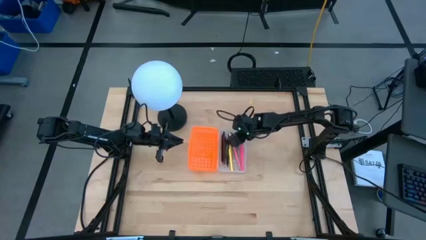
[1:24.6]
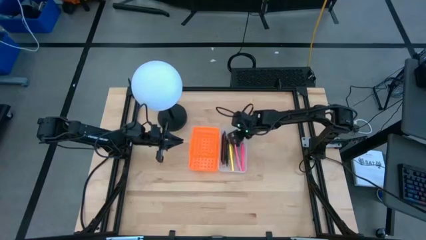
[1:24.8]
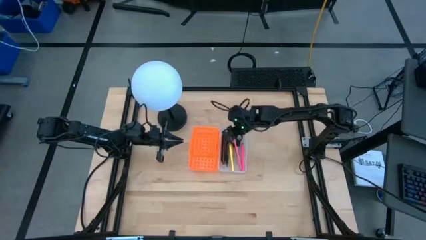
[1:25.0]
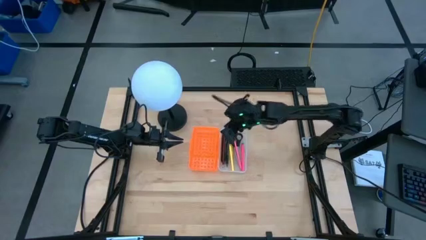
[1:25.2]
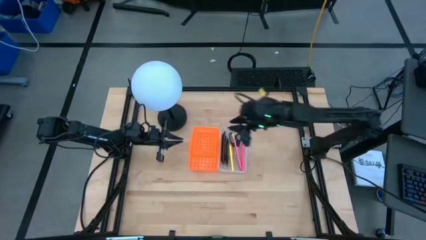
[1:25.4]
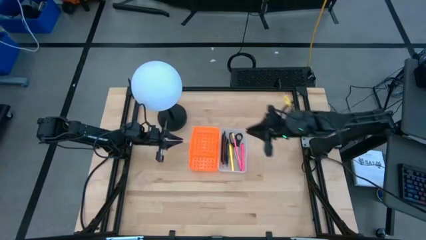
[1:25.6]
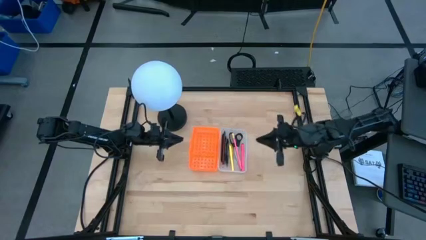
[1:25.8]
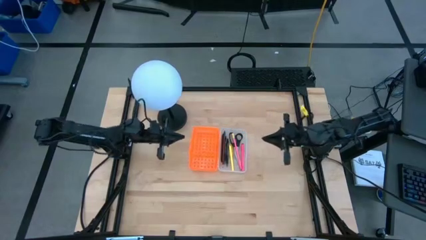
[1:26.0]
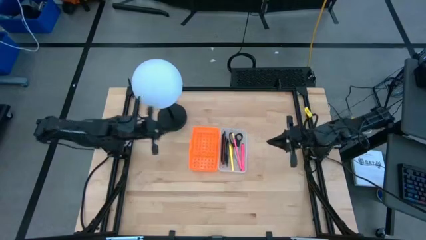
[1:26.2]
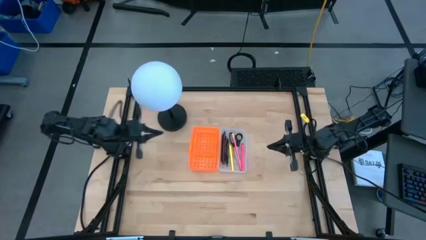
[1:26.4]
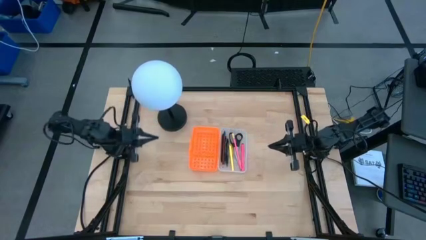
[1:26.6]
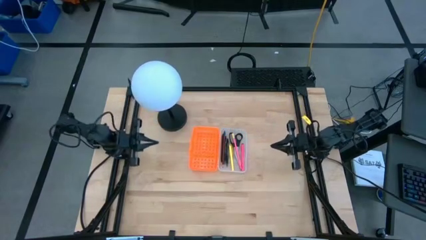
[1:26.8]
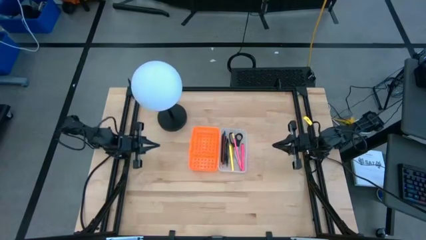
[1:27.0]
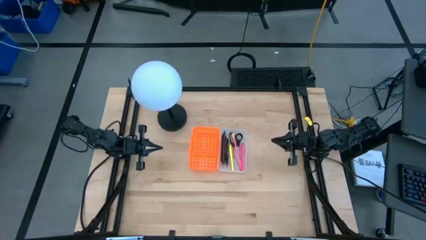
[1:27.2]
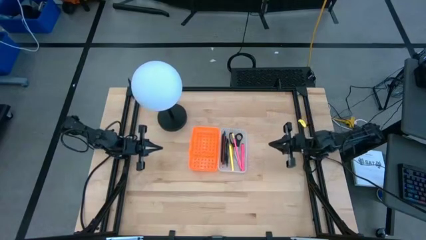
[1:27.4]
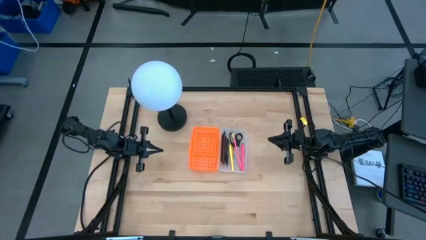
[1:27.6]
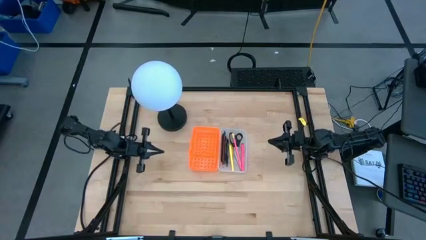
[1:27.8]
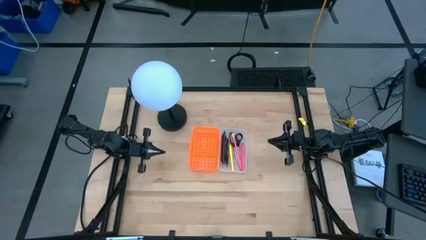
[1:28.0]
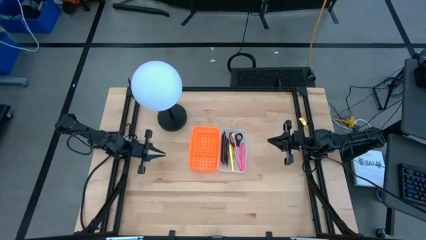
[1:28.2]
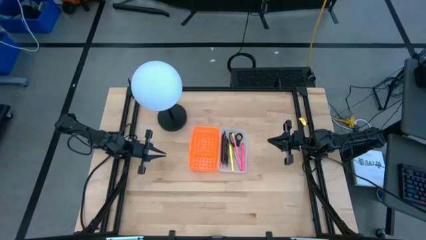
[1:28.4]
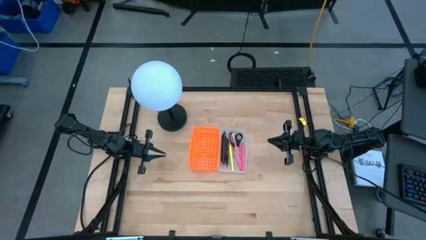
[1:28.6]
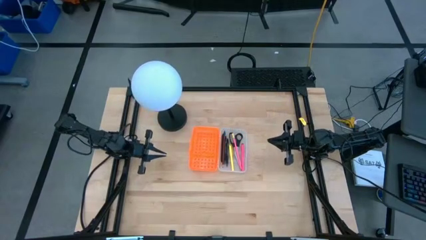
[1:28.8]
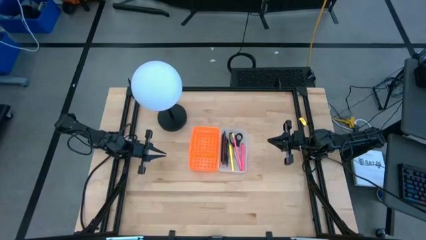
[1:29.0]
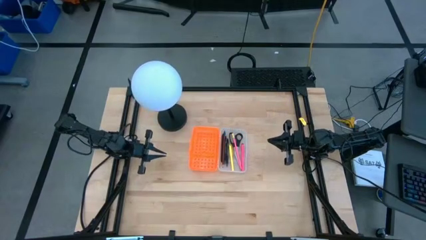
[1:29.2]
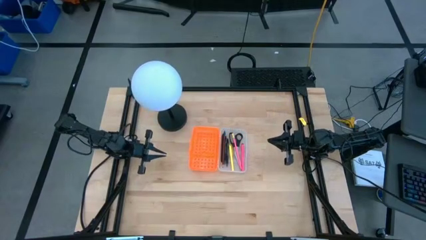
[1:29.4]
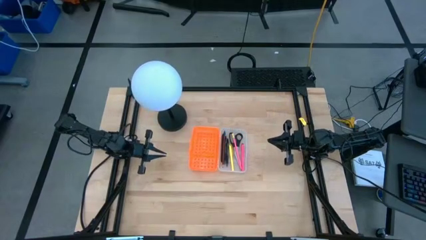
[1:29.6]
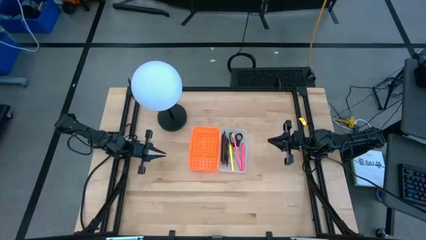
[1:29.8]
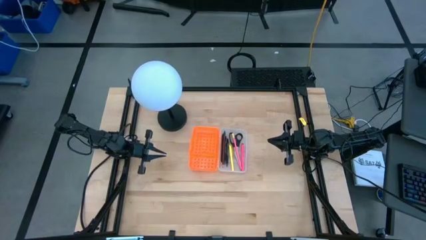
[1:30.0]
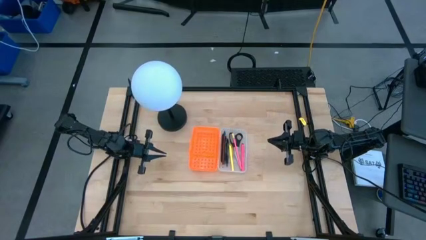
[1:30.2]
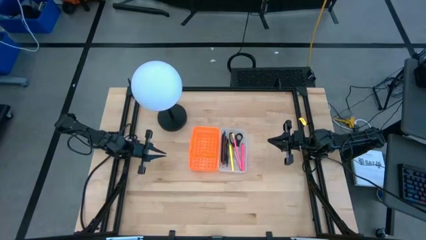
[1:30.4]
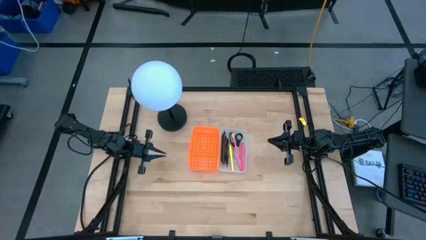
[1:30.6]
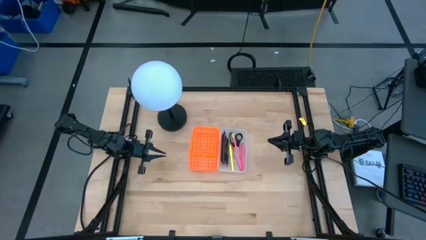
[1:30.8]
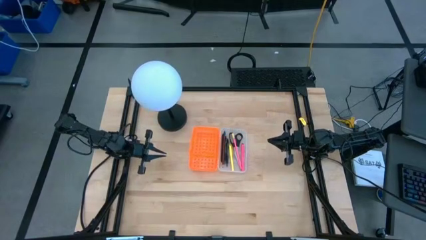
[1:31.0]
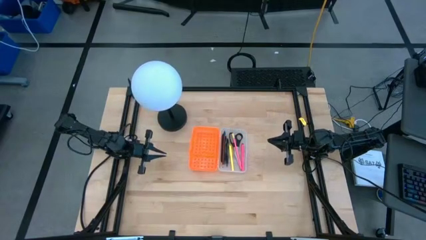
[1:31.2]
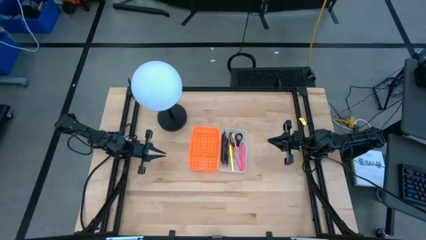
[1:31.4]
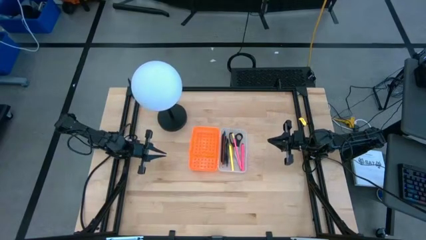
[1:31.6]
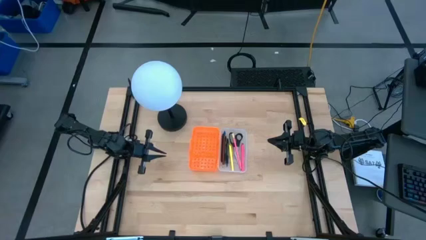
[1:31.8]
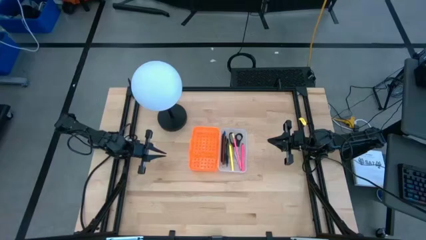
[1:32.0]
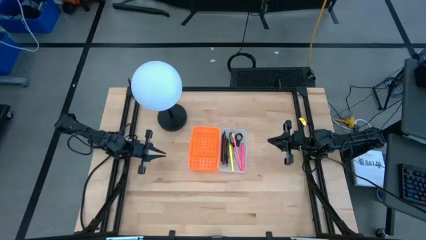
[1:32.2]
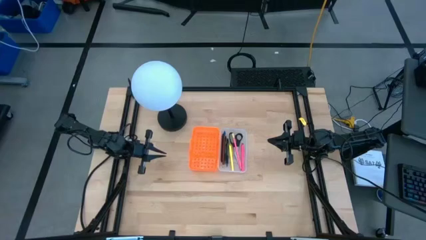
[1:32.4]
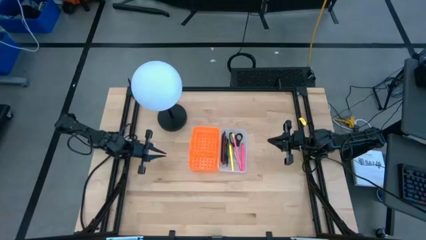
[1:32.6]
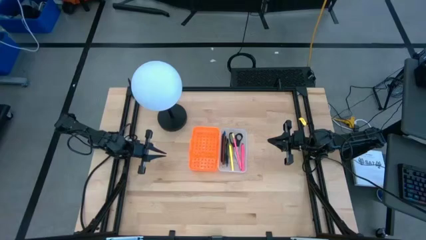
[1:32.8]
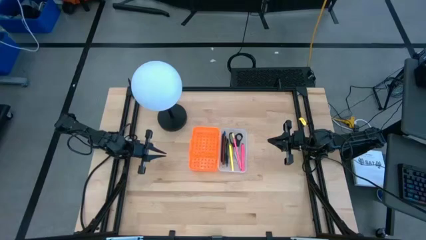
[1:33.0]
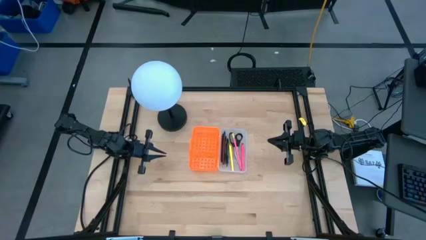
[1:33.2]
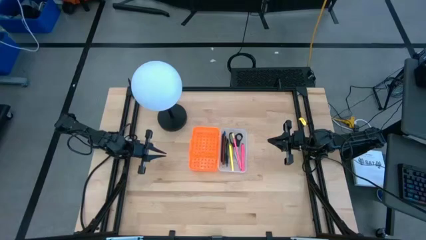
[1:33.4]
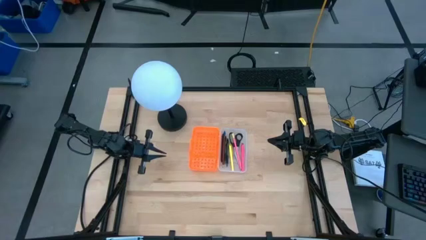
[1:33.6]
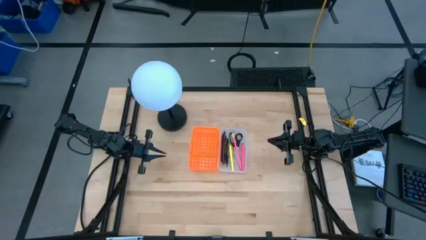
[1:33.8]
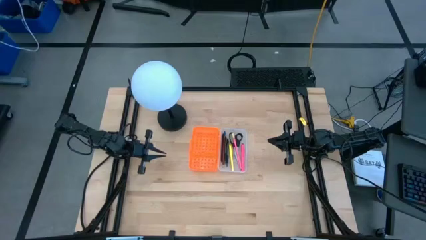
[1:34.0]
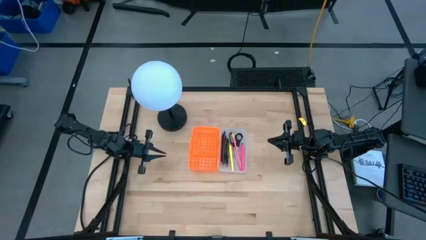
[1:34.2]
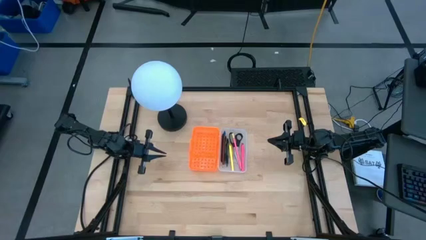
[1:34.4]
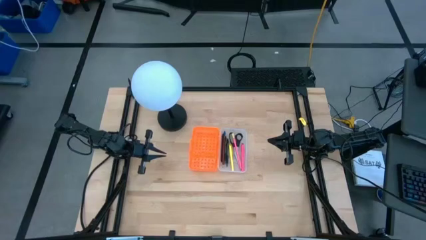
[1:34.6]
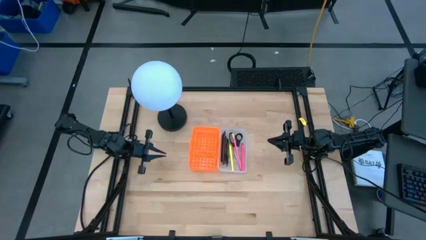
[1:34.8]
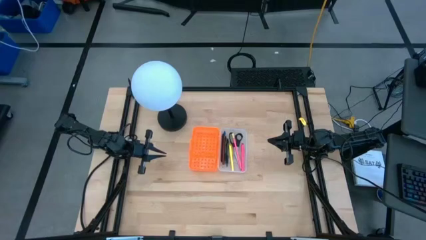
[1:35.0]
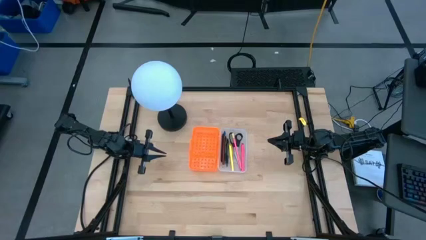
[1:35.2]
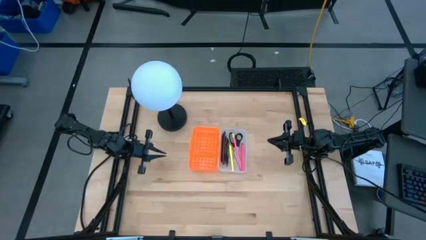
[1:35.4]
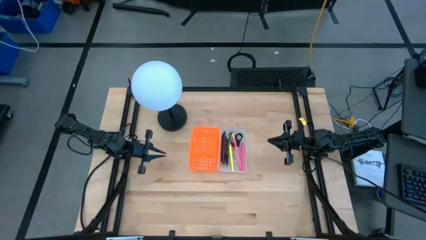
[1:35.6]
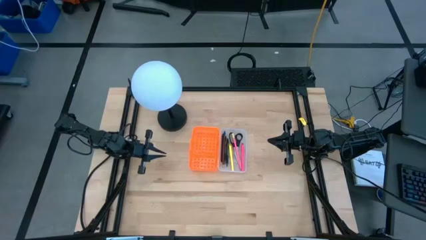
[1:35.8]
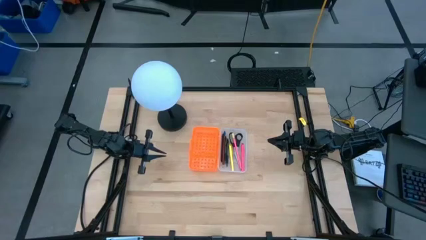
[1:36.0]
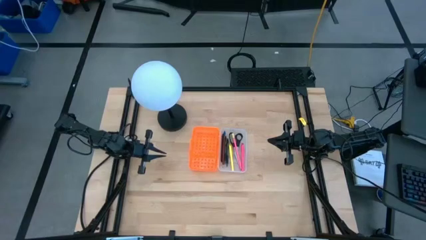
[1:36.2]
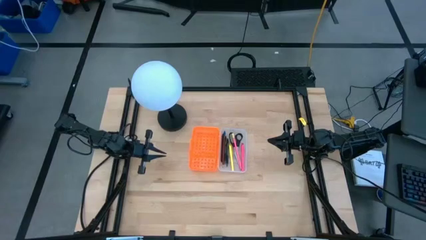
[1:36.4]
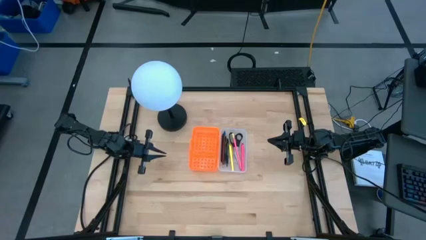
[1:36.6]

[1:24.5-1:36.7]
Task: Pick & place school supplies into a supply box
Return to Home Position

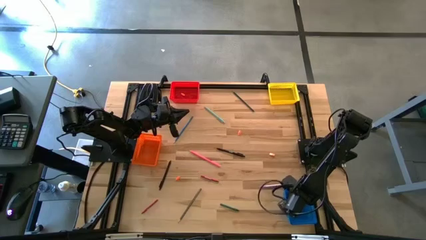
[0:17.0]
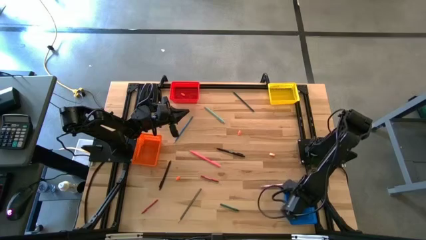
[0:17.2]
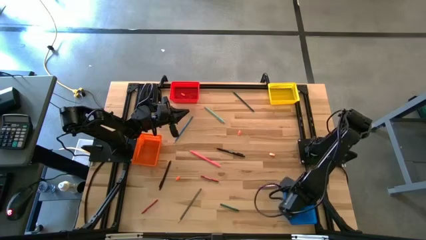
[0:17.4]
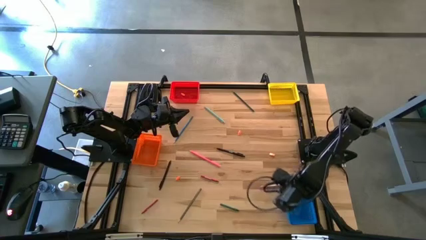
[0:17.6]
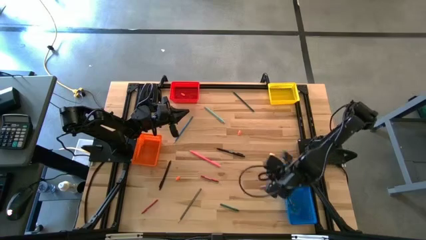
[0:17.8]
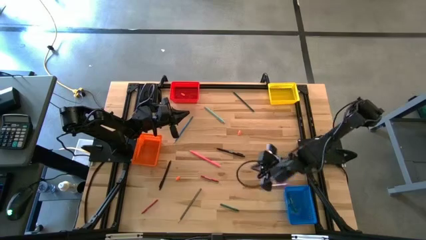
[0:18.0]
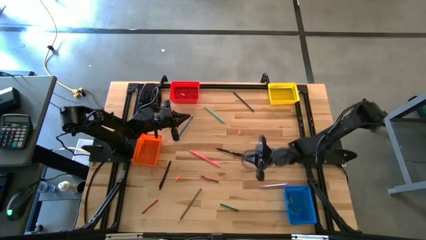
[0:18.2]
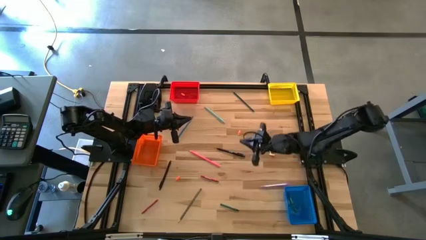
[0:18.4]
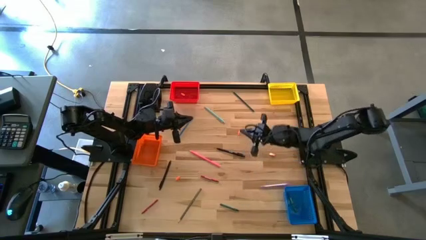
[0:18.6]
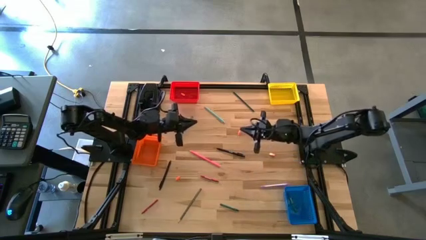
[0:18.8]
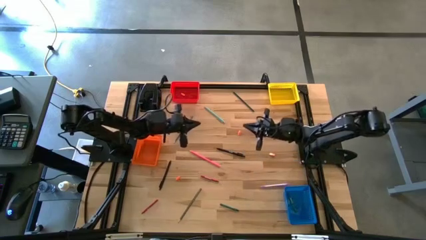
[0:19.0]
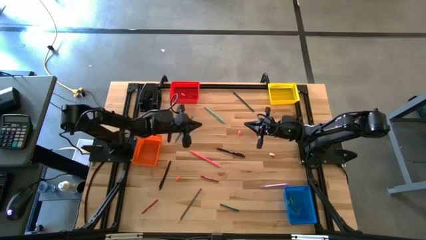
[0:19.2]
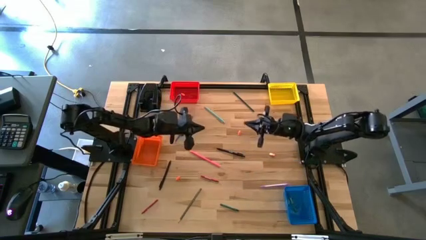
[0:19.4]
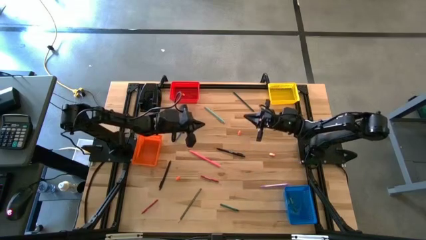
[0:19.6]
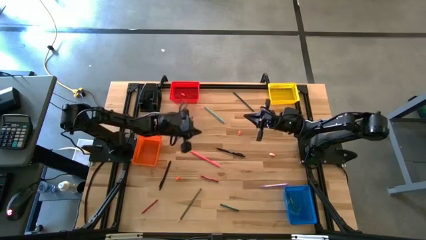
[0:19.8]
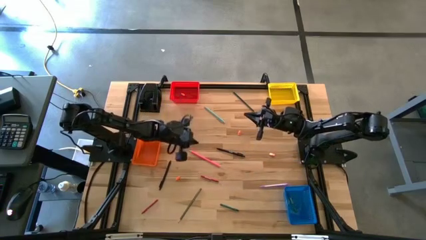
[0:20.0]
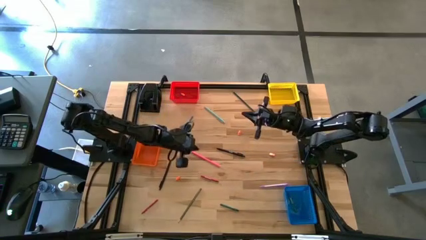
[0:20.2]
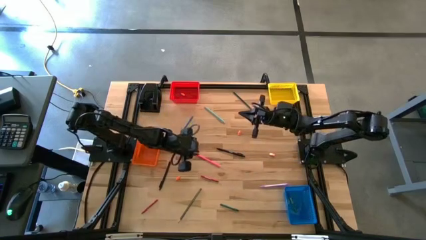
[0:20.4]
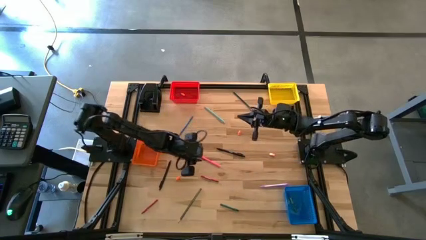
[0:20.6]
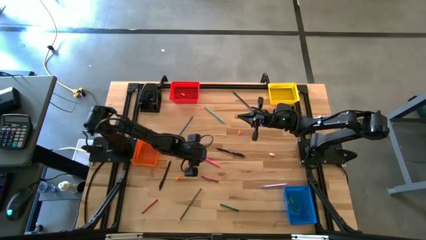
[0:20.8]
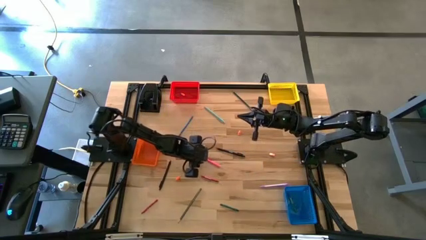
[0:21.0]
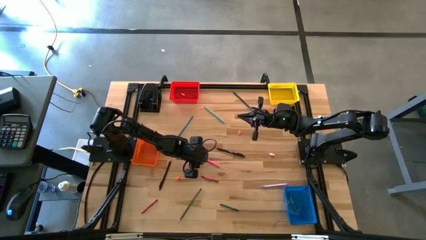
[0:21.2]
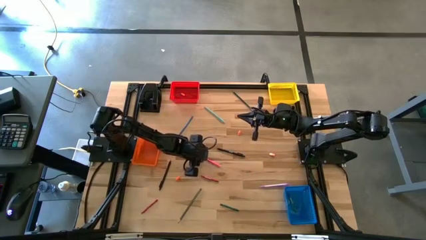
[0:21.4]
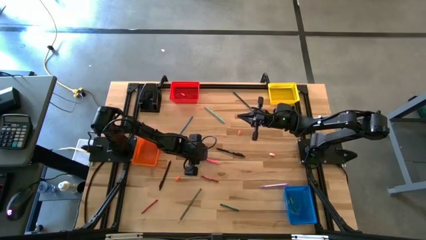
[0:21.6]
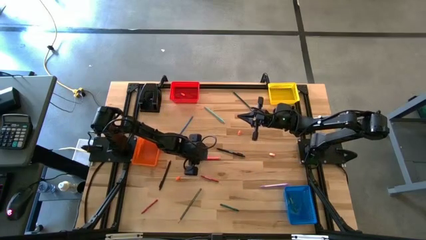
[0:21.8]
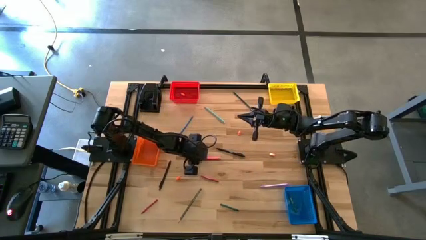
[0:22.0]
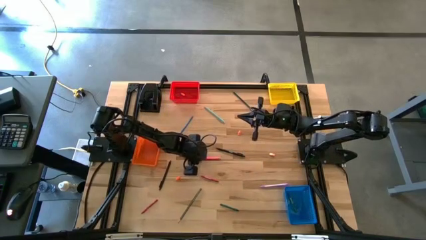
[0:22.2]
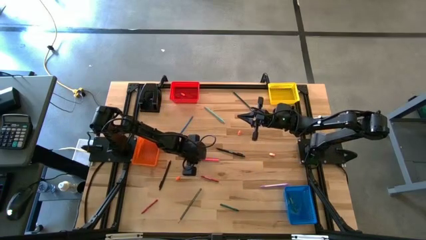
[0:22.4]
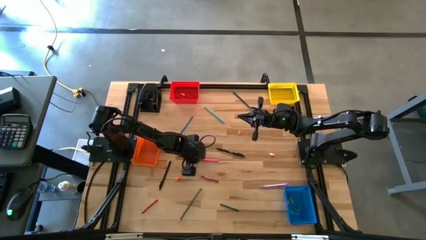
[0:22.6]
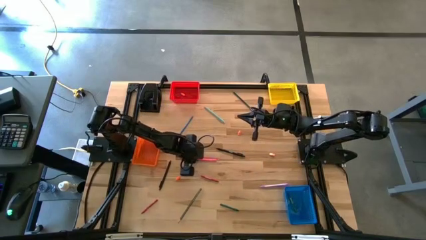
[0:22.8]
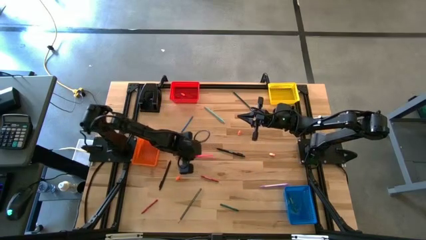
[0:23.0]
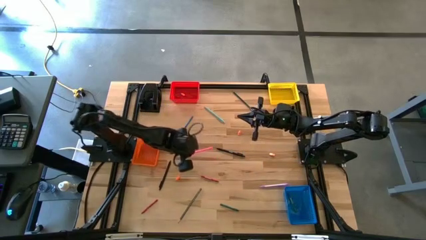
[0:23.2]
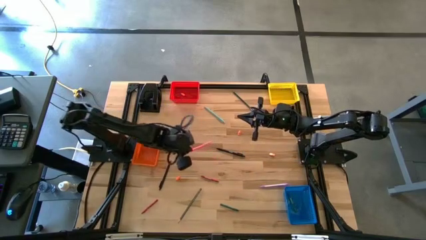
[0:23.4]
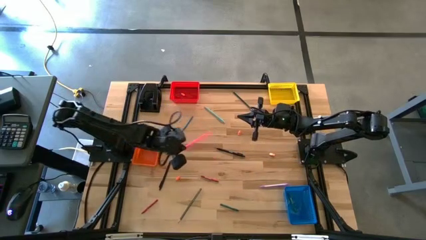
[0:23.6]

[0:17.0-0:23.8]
Task: Sort crayons/erasers/pens/pencils in bins
Put the pink pencil into the orange basket
